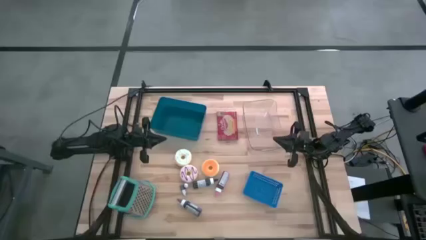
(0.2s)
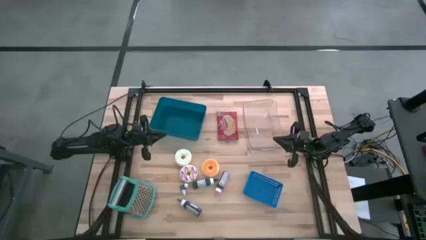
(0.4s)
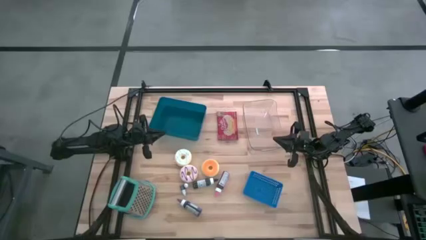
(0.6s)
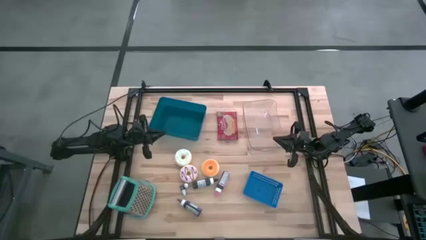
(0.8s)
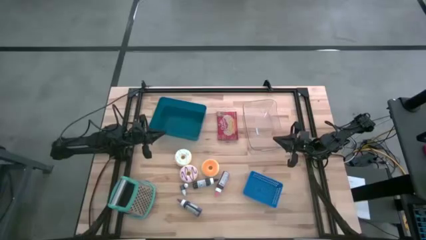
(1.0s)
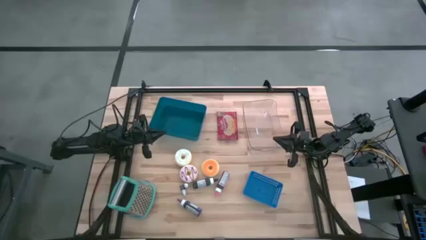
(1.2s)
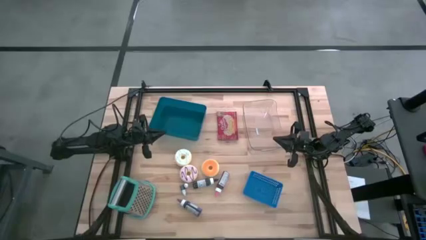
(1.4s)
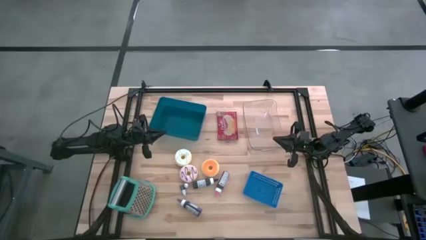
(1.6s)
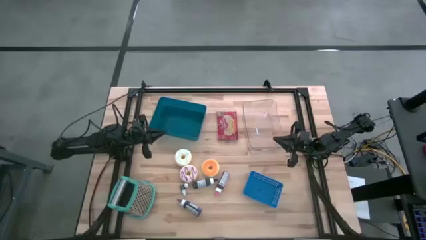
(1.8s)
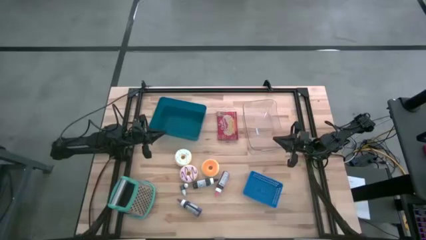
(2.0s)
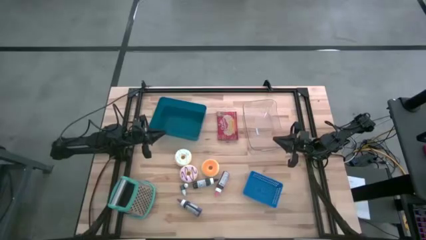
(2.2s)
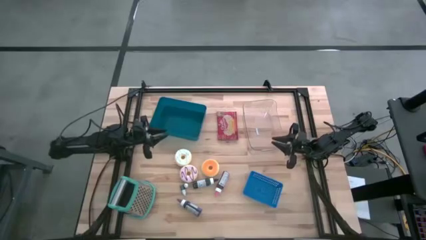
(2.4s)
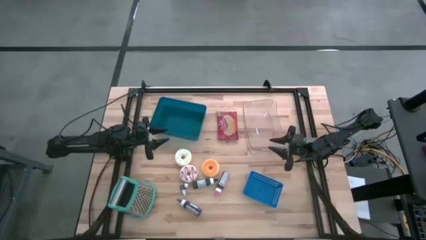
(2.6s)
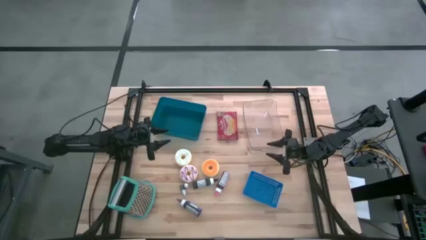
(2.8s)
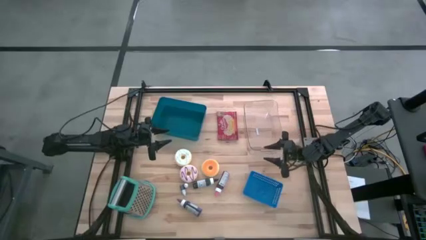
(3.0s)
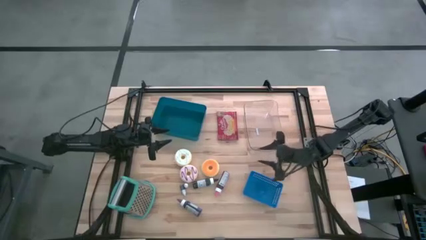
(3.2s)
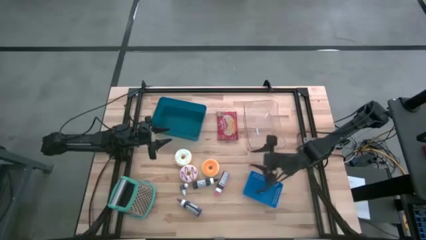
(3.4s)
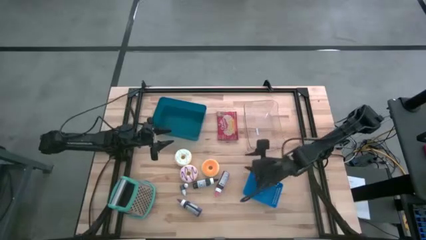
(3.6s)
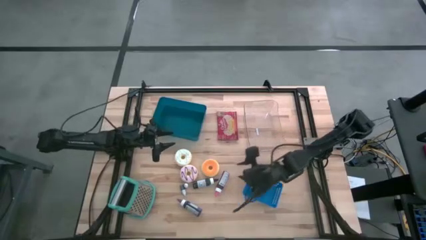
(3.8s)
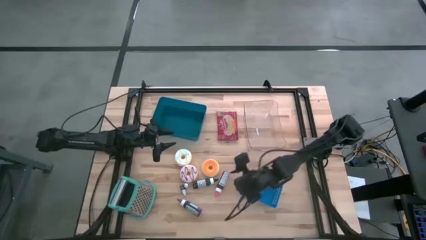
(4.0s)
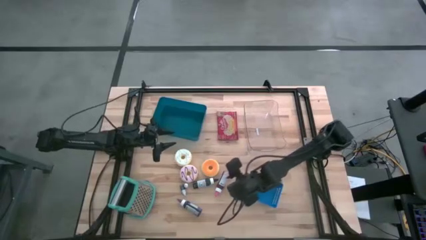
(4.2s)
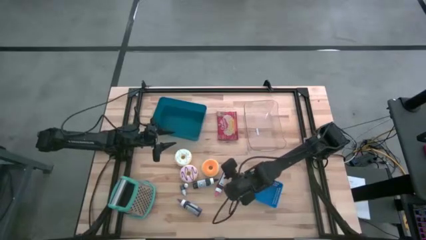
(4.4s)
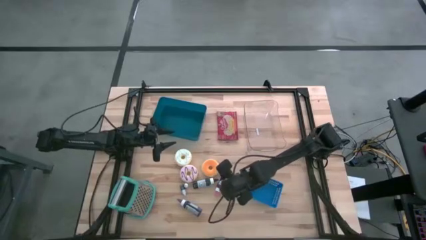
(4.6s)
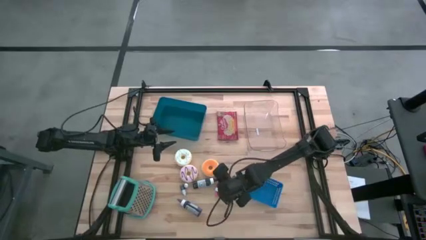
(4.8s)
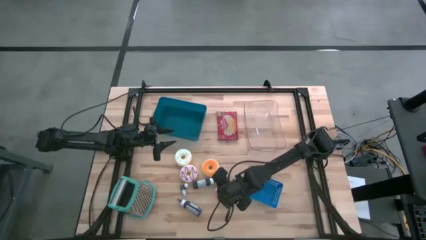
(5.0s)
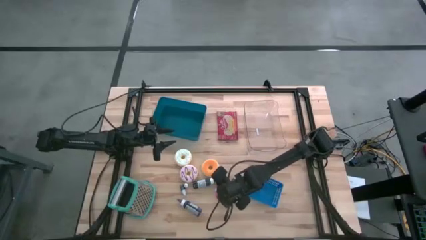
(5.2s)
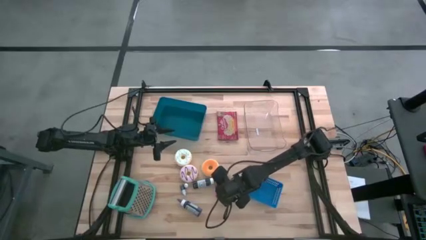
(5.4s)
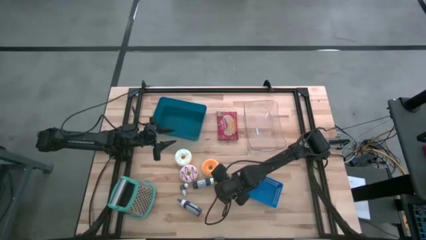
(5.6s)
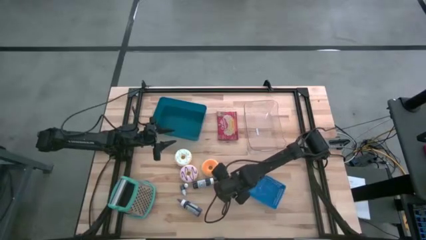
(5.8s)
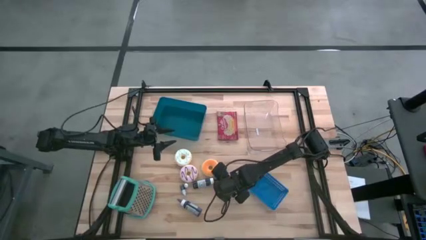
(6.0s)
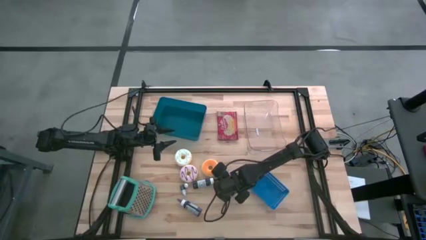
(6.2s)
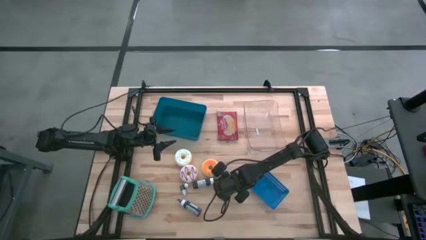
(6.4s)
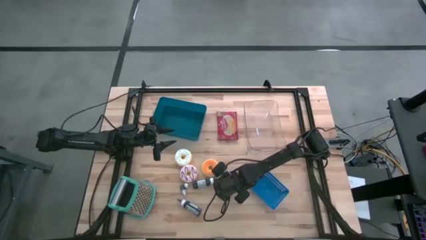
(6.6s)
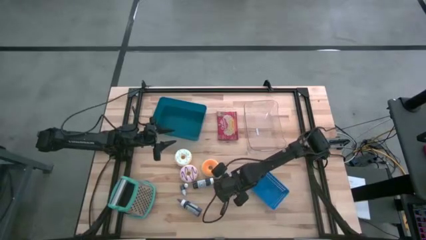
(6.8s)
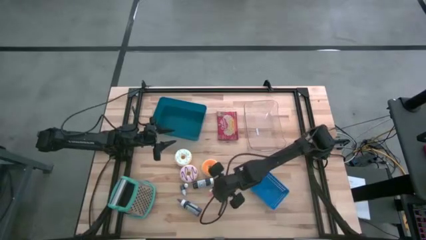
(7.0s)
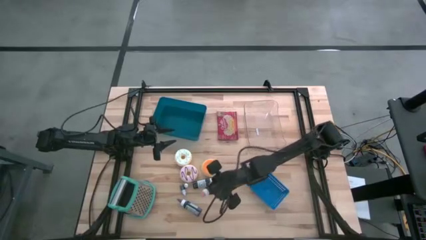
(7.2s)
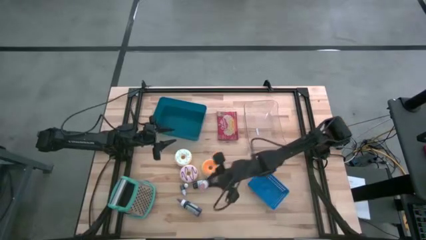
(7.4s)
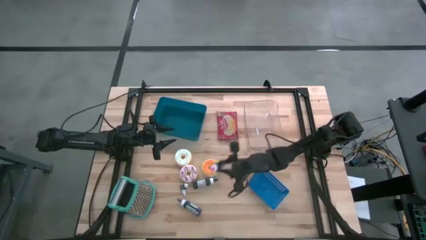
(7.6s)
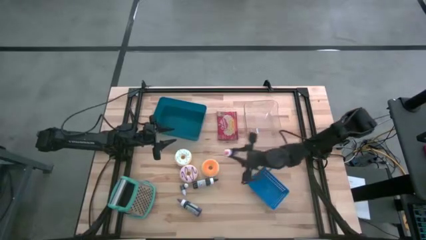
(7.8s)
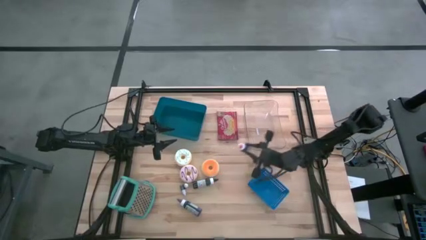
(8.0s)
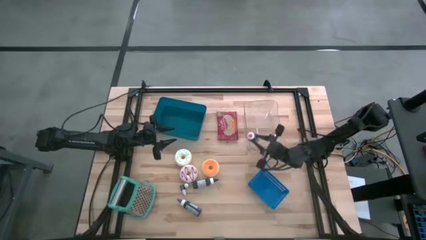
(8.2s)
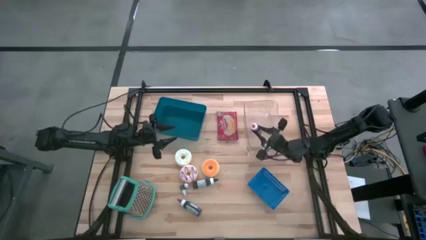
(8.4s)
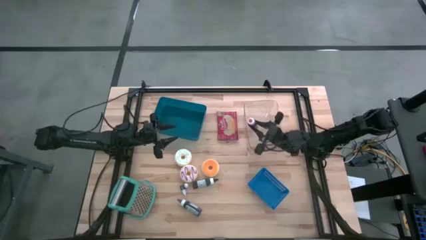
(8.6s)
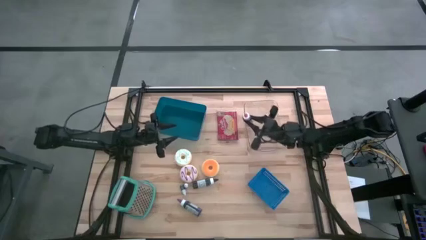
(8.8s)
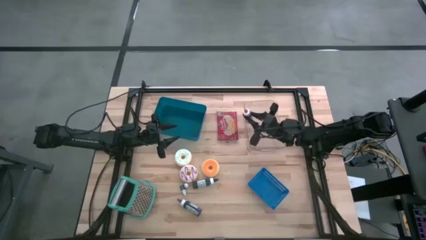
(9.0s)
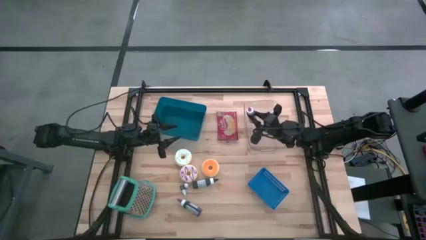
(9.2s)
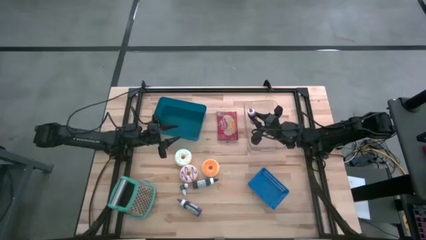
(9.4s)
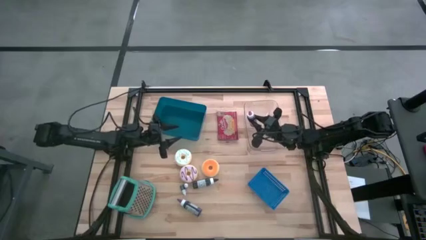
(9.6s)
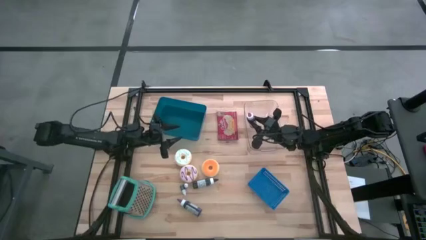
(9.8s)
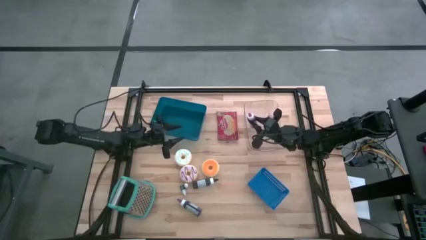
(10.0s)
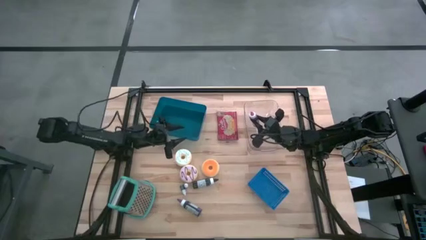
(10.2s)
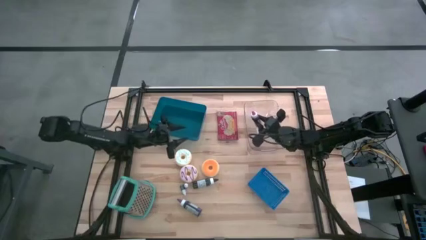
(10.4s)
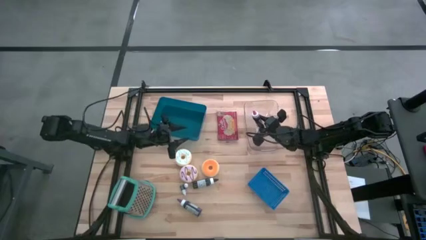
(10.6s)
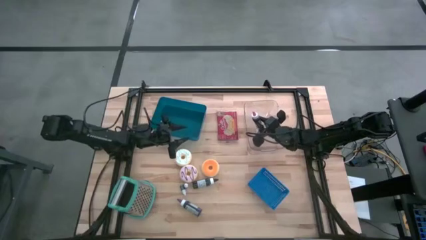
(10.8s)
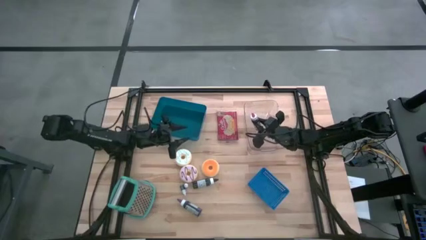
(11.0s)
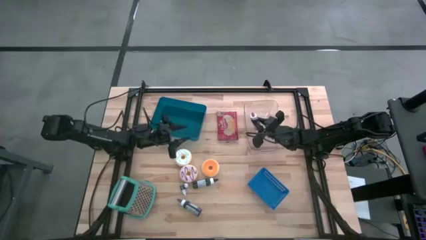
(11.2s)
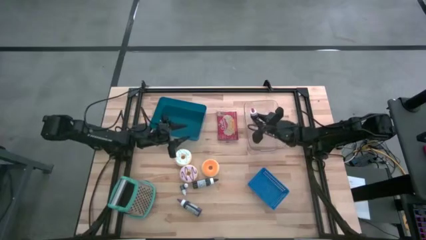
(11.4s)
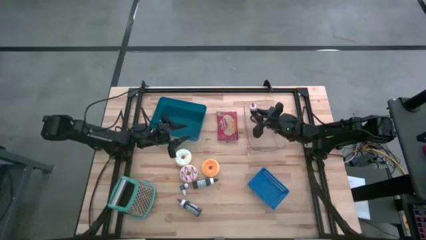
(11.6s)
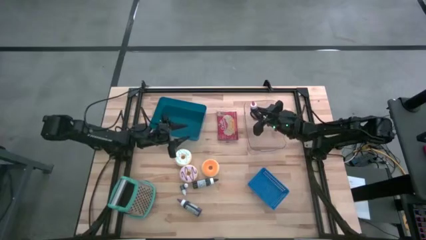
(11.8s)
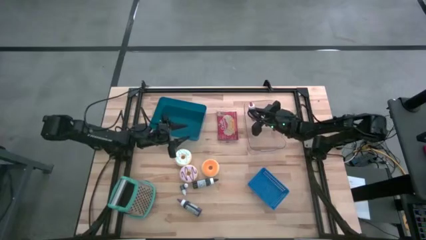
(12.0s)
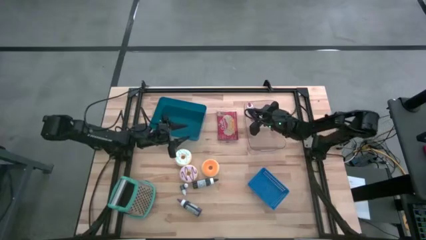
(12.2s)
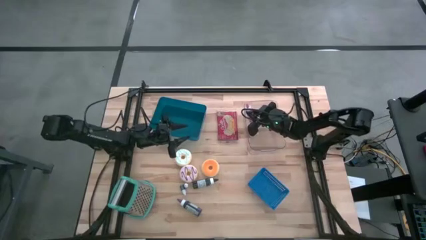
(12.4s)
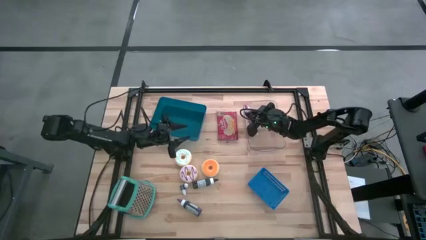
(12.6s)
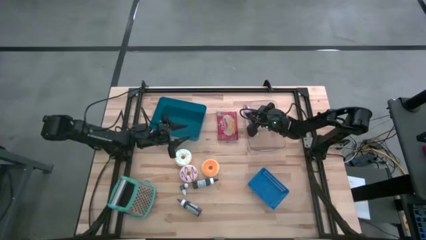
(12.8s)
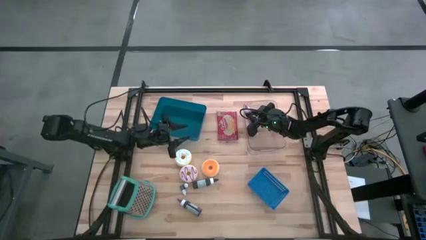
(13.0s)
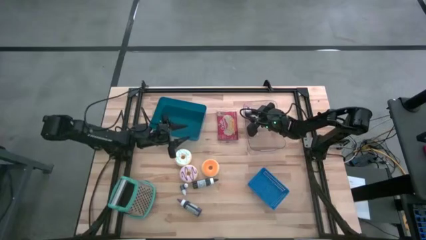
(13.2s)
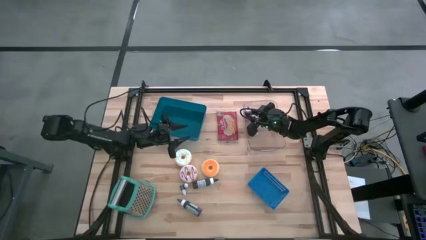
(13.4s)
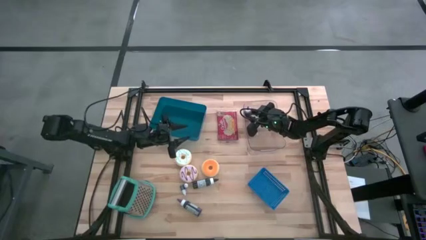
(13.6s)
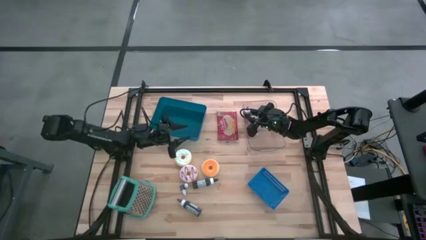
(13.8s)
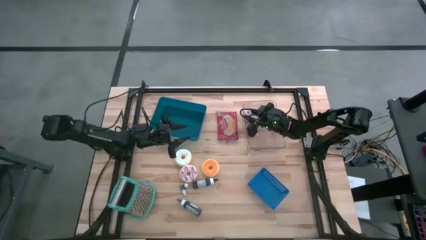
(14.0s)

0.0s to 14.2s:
Task: Pick & Place Food Item
Put the pink food coloring bottle into the transparent bin
